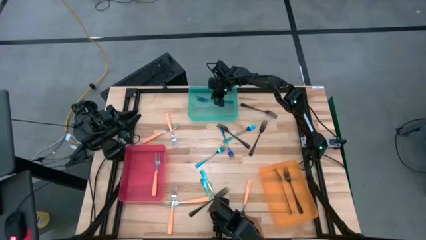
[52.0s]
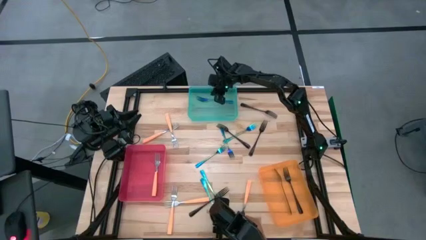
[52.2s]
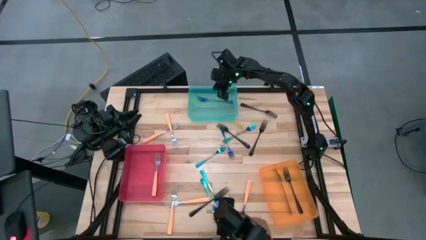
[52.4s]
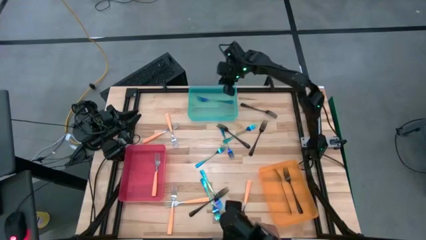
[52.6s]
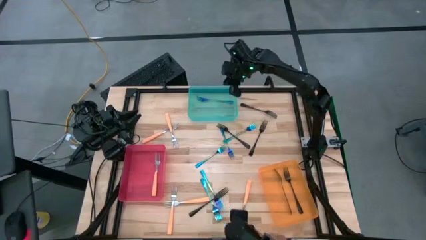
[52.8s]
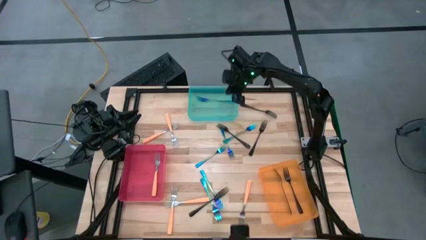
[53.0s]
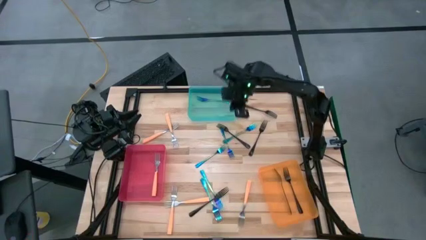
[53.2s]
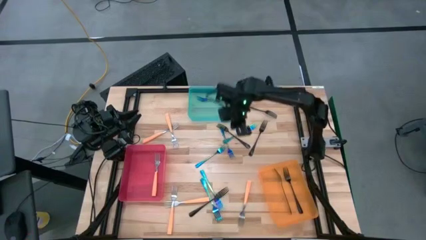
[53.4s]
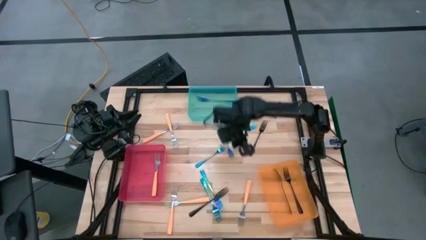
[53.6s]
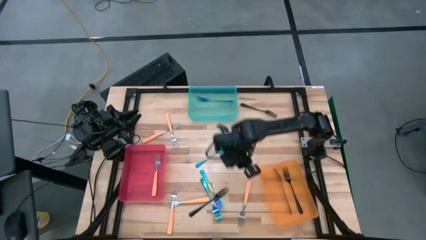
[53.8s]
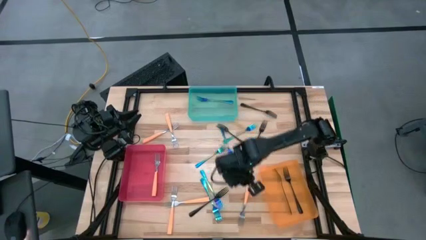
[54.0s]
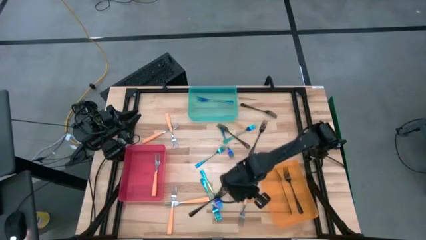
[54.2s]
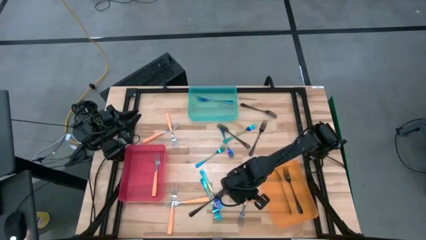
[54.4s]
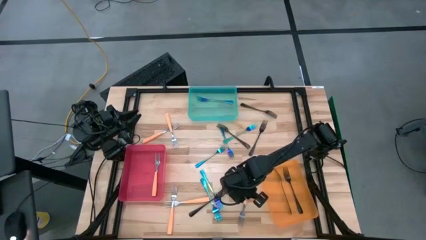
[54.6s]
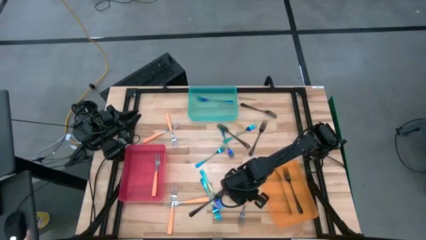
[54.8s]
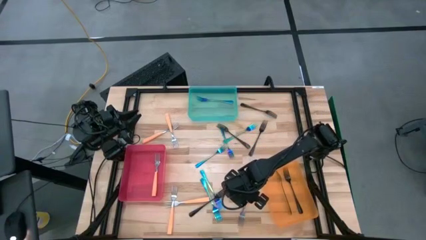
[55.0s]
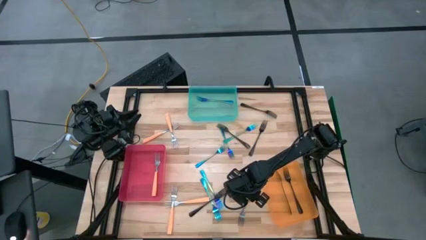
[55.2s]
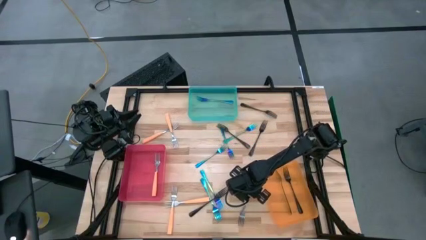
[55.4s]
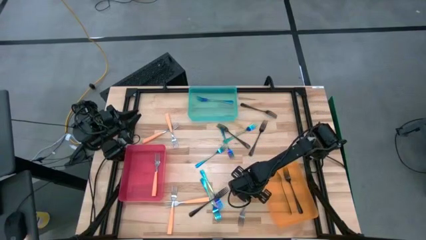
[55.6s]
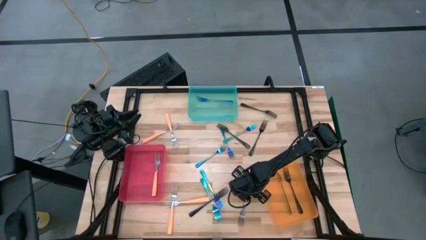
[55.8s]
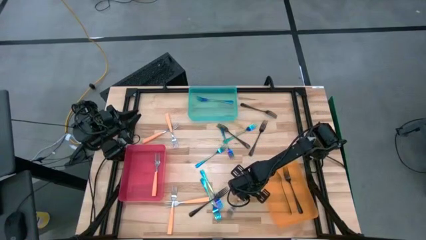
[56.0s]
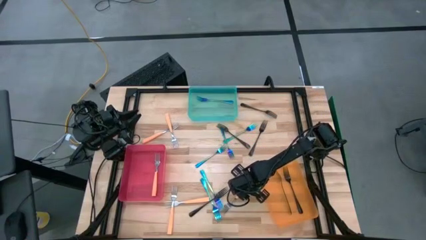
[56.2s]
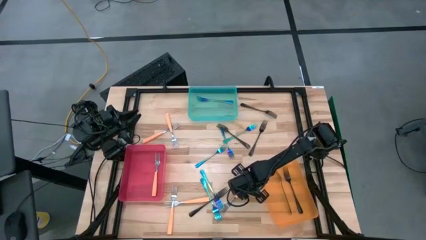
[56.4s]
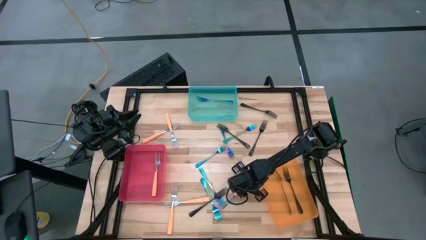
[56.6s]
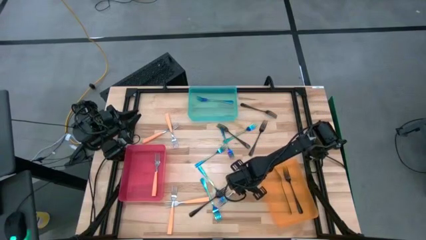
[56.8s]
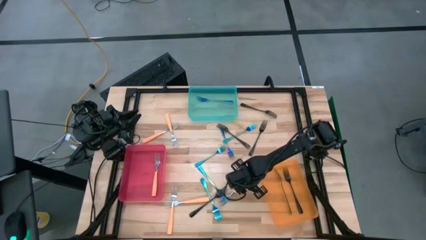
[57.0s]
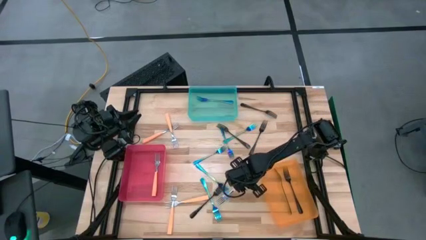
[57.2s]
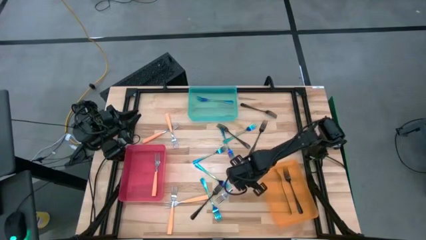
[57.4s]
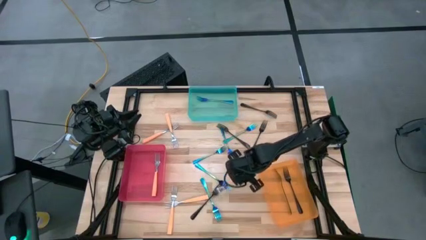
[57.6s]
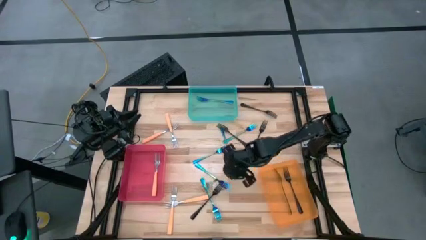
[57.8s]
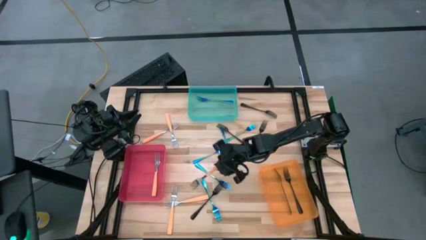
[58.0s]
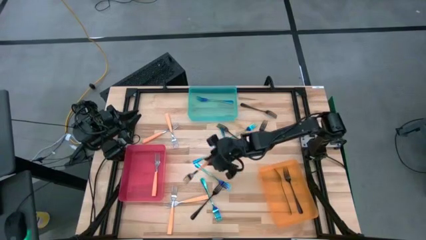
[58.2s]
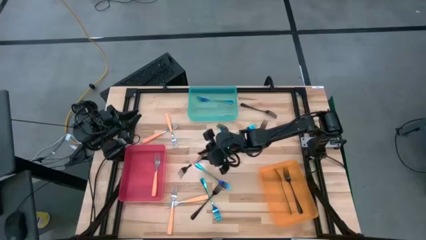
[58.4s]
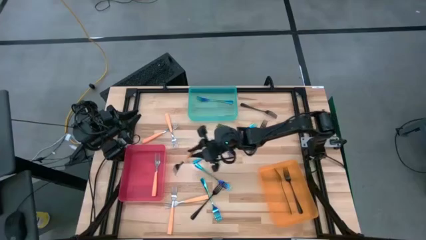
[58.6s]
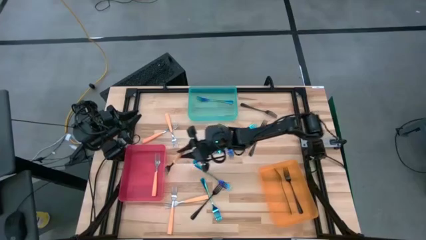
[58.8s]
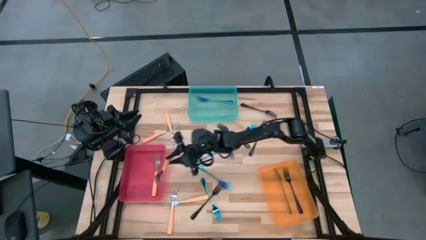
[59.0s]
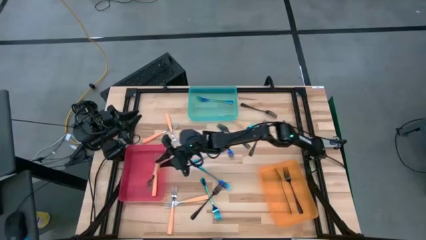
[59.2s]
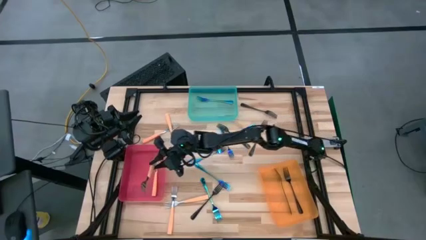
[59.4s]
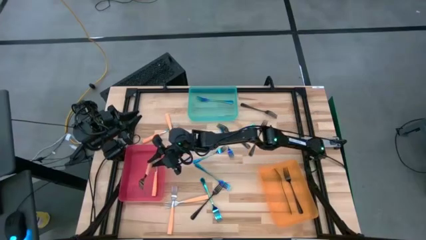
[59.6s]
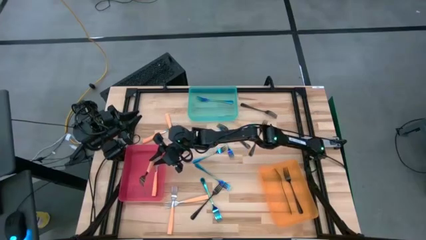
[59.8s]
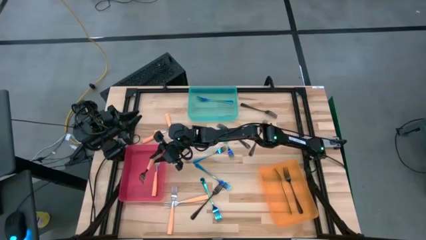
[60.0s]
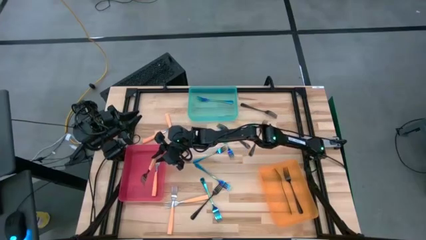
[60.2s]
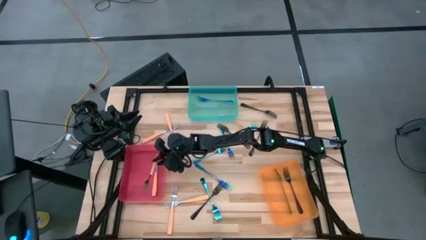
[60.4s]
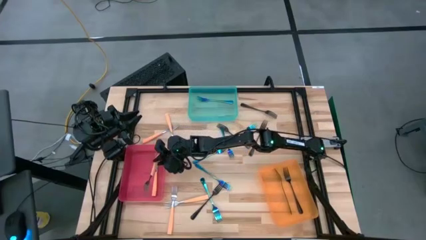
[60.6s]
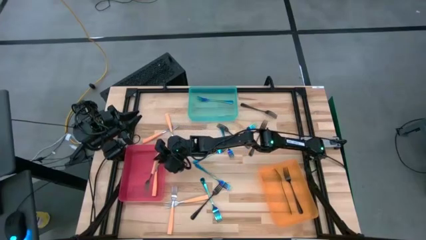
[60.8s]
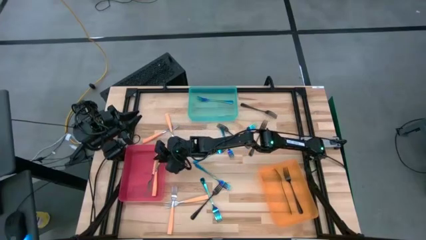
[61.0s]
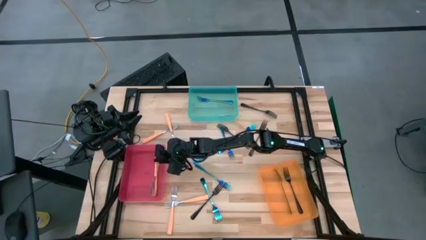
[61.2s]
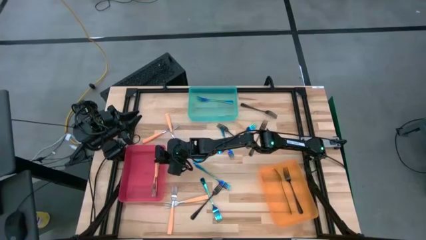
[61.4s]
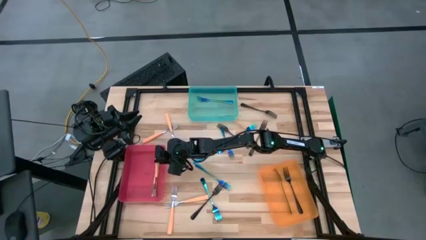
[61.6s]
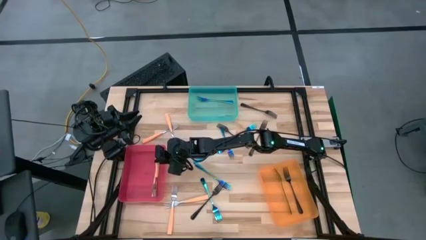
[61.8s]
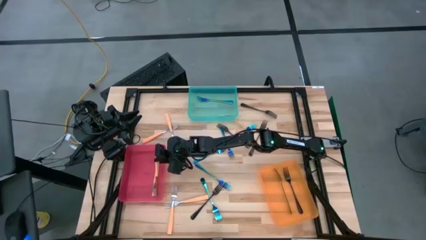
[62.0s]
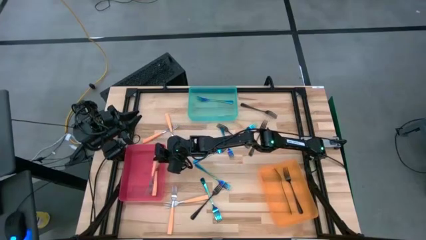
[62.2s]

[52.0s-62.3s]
Task: Sort silverware by color (type)
Put the orange fork into the red bin

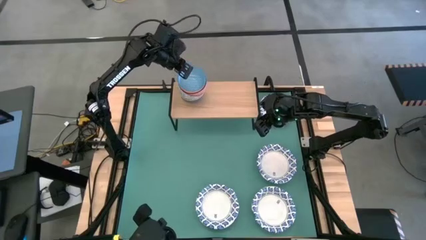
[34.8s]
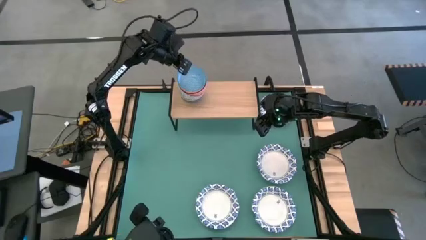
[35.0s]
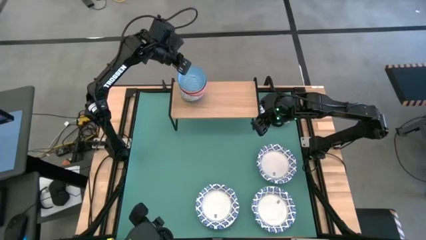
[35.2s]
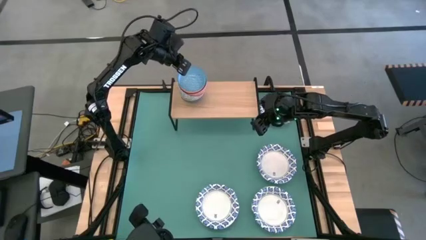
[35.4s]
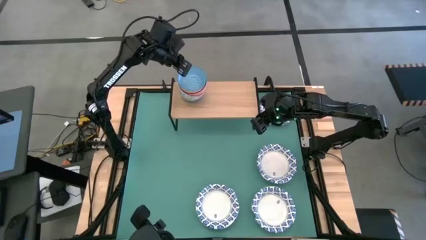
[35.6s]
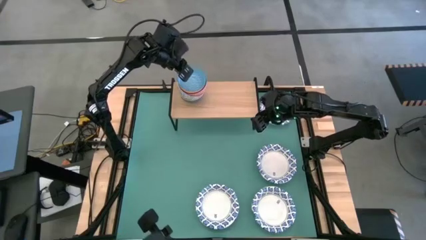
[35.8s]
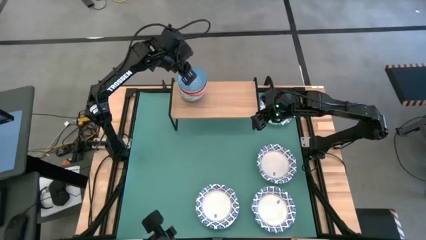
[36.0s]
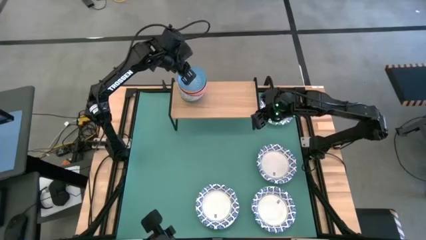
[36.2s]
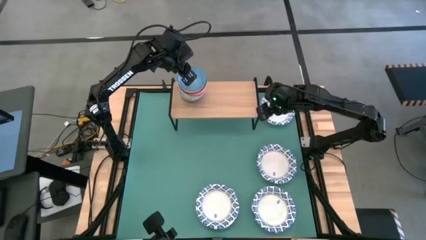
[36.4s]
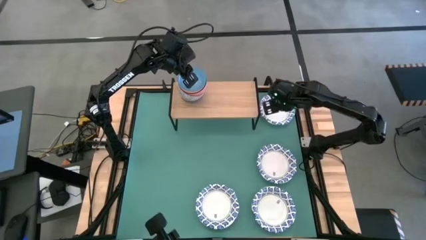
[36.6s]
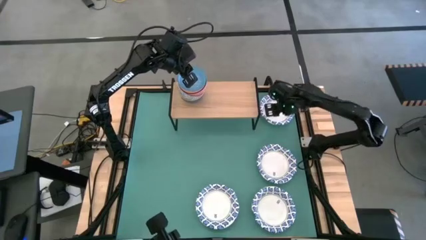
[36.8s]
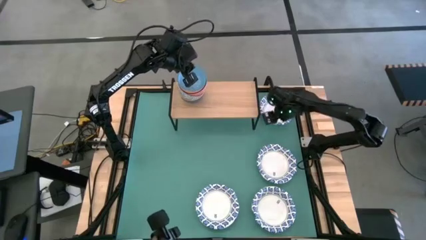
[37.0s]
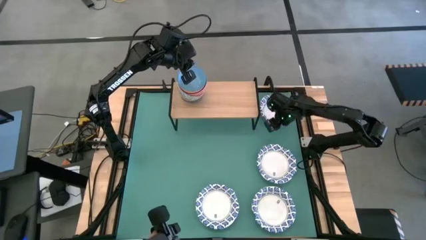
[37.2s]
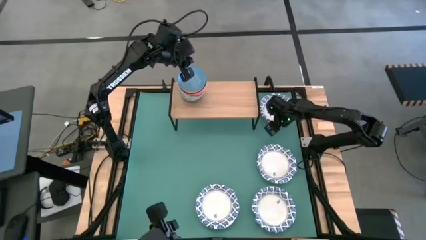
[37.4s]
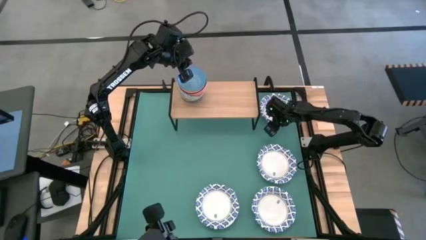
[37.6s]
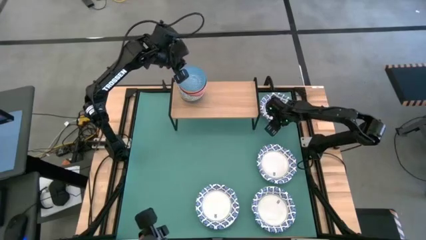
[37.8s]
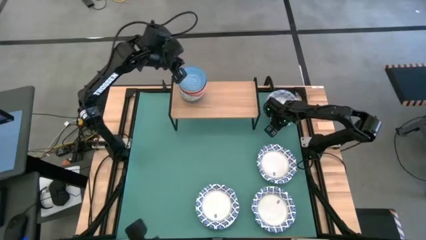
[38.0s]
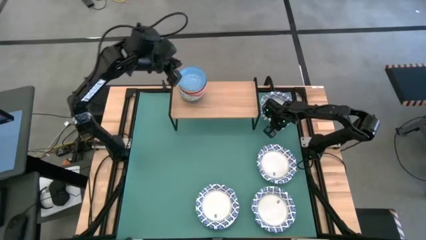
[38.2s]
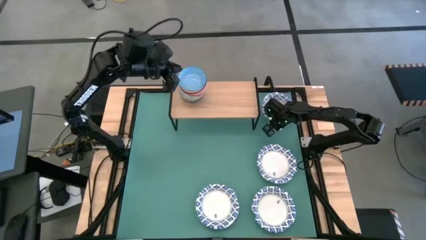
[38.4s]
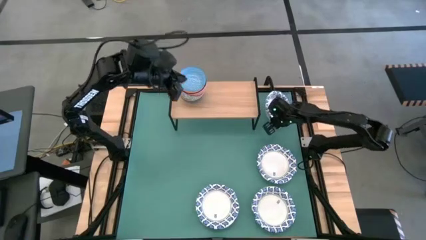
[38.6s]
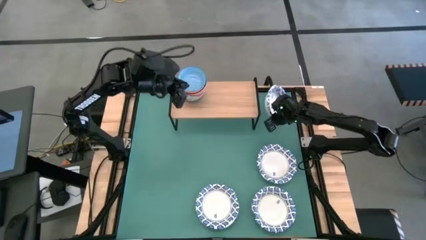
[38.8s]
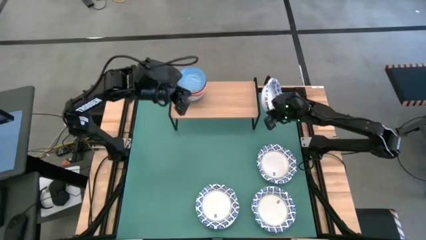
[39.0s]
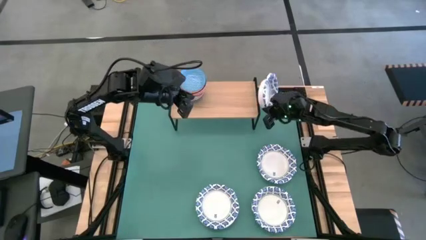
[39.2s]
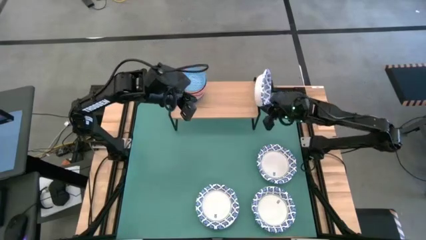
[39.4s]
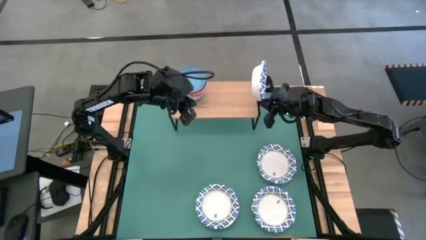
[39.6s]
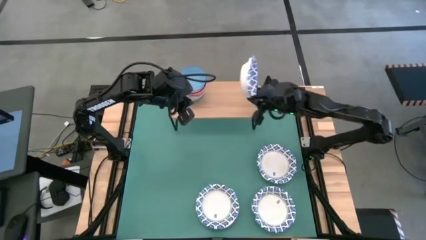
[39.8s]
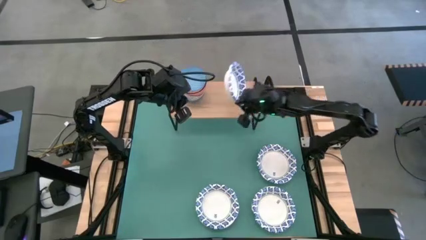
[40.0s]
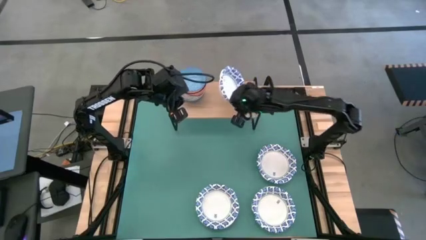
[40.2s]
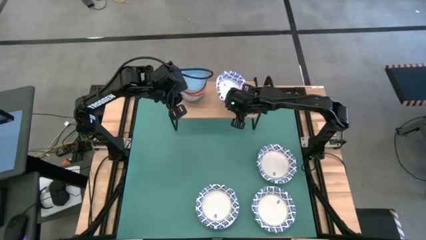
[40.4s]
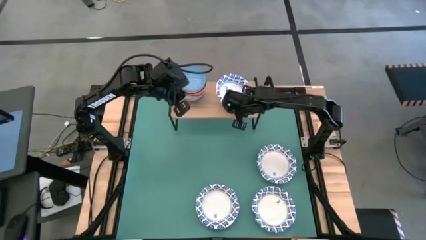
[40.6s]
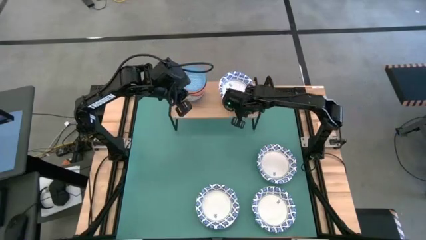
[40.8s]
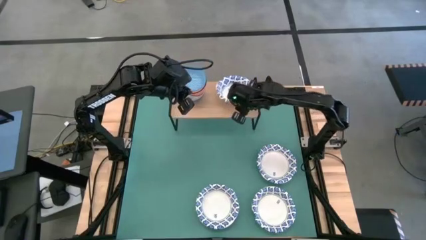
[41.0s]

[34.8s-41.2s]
Task: Place and stack bowls onto a shelf
Put the white bowl on the shelf
